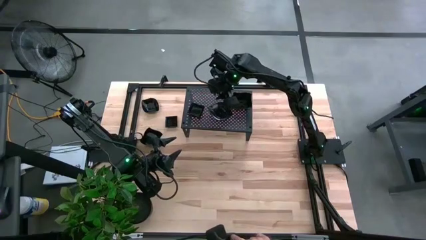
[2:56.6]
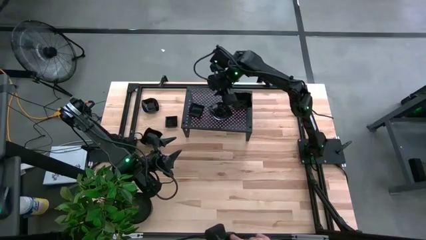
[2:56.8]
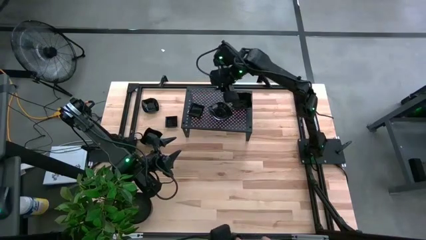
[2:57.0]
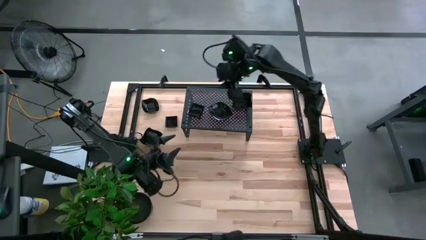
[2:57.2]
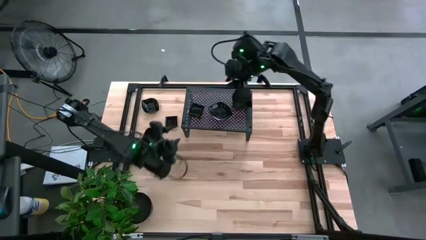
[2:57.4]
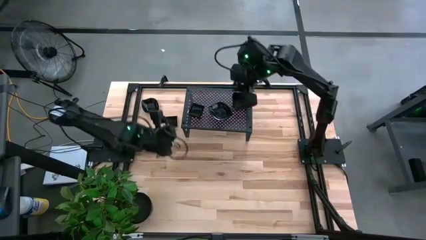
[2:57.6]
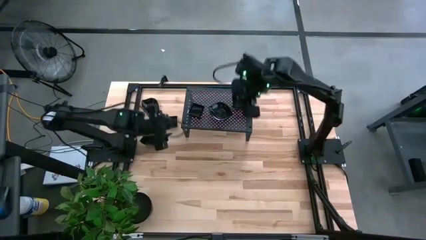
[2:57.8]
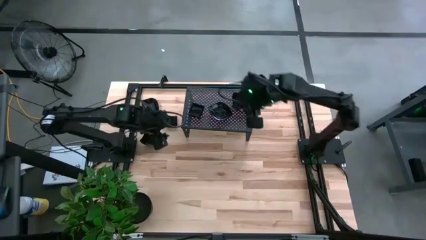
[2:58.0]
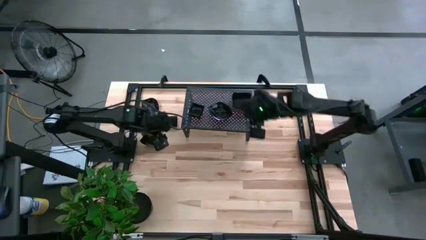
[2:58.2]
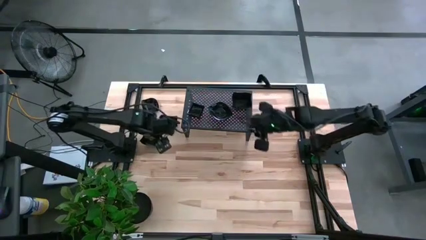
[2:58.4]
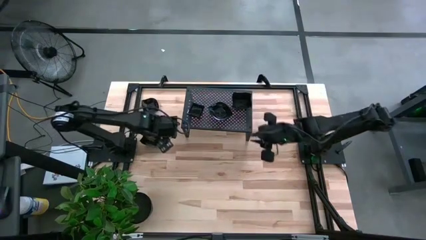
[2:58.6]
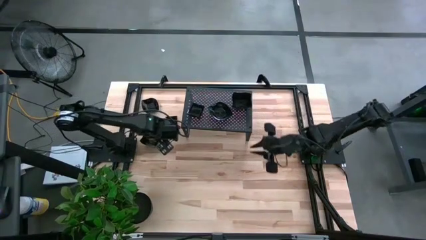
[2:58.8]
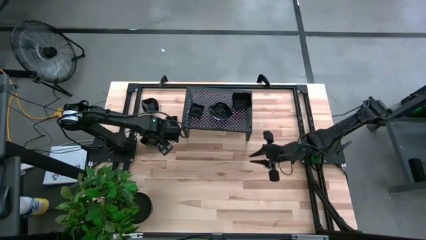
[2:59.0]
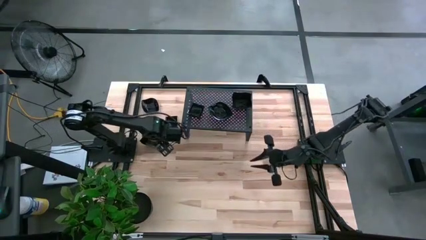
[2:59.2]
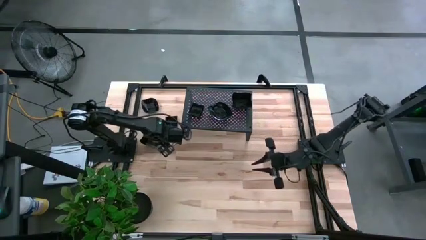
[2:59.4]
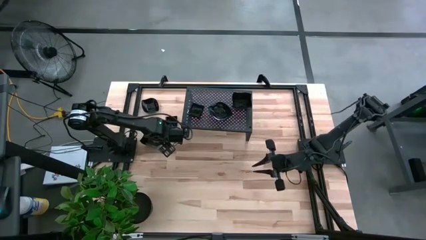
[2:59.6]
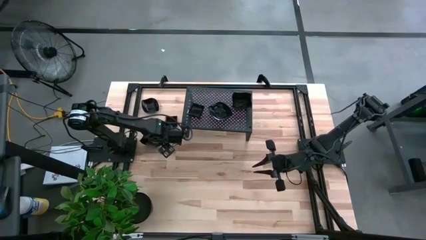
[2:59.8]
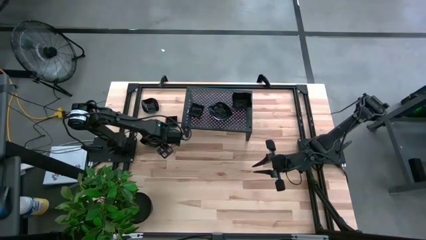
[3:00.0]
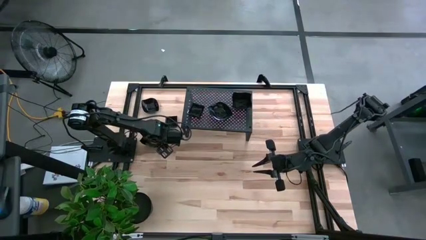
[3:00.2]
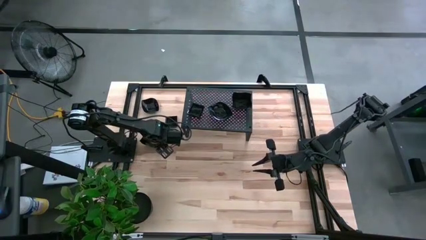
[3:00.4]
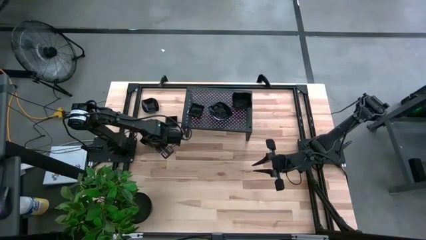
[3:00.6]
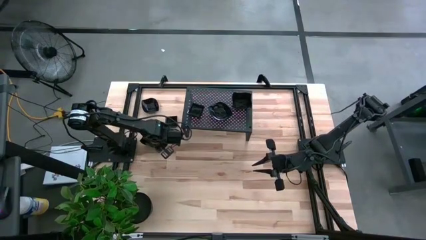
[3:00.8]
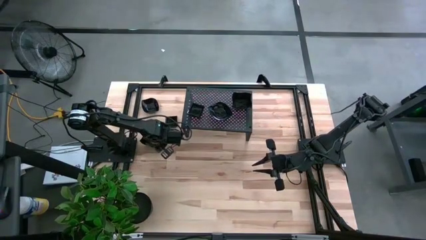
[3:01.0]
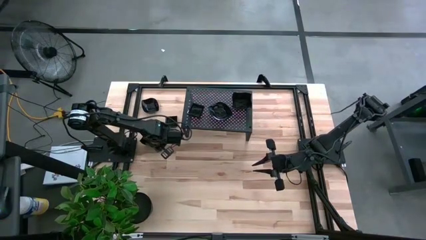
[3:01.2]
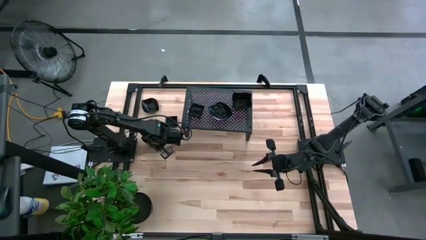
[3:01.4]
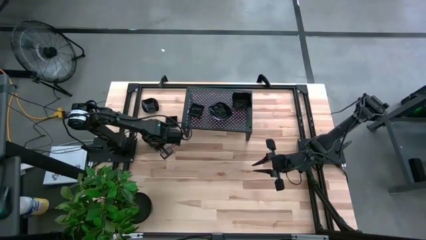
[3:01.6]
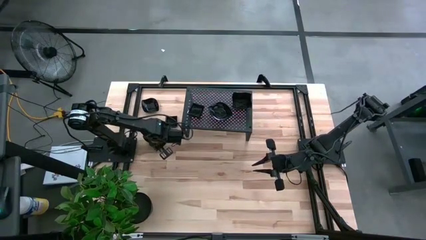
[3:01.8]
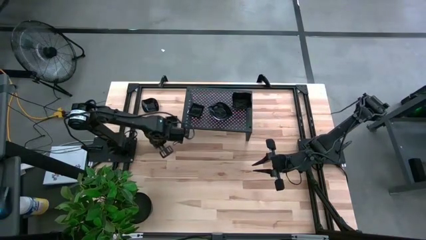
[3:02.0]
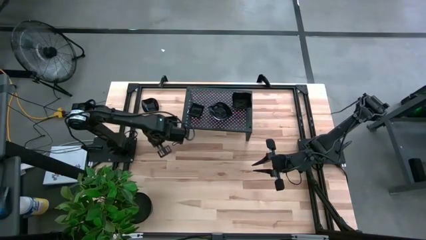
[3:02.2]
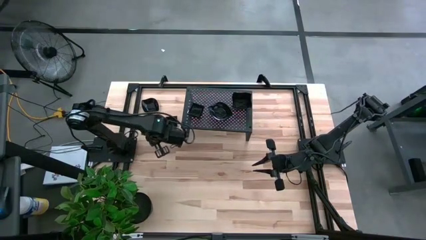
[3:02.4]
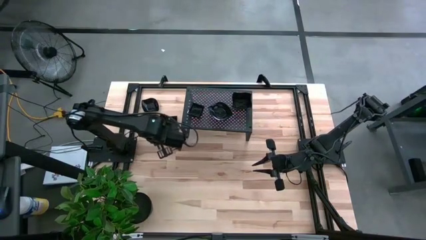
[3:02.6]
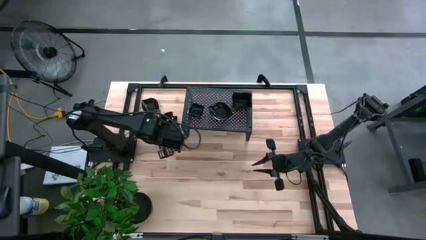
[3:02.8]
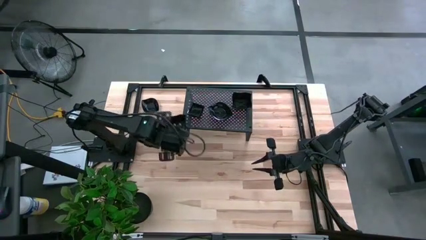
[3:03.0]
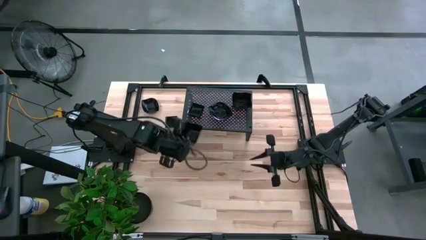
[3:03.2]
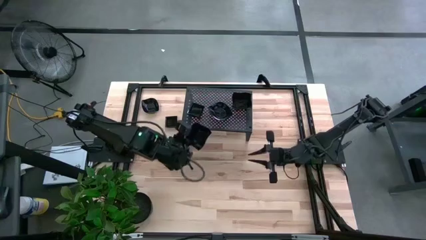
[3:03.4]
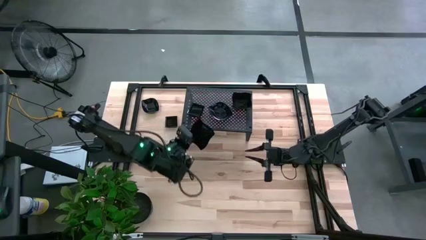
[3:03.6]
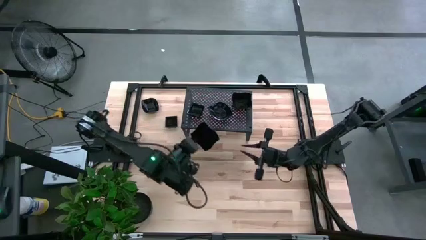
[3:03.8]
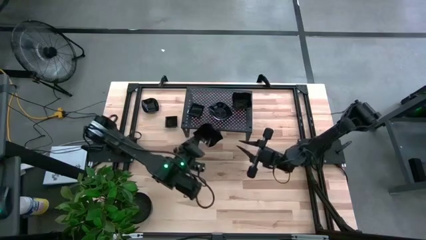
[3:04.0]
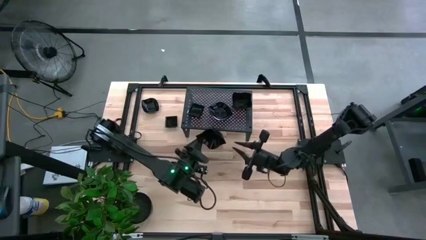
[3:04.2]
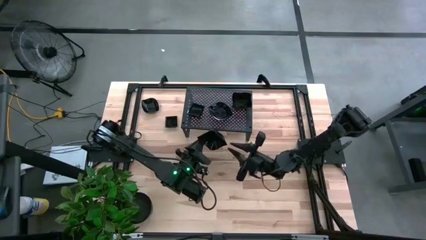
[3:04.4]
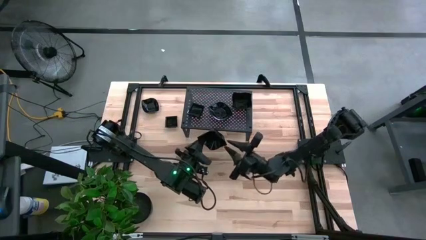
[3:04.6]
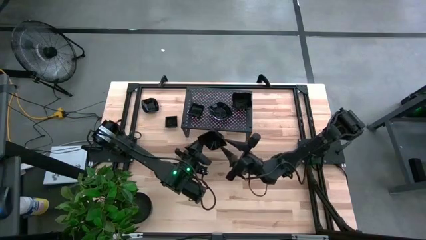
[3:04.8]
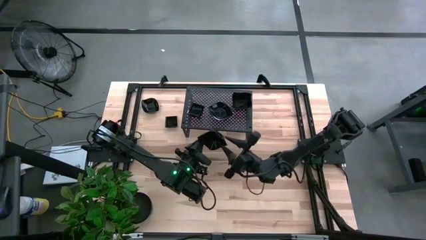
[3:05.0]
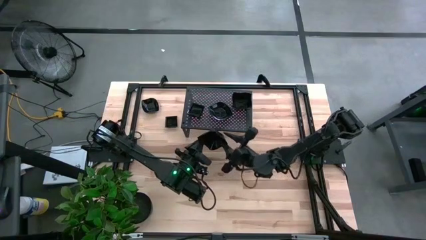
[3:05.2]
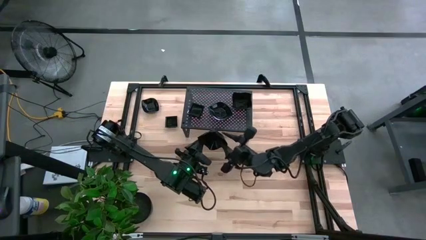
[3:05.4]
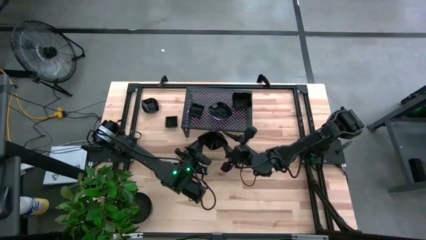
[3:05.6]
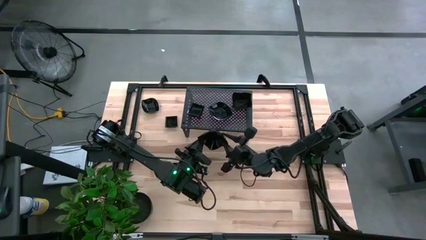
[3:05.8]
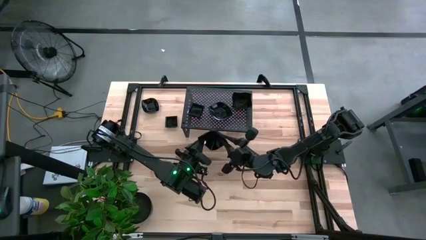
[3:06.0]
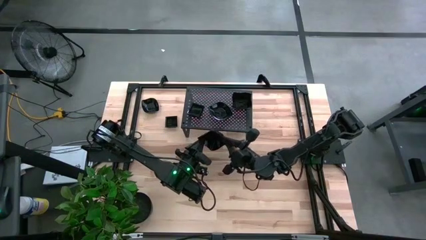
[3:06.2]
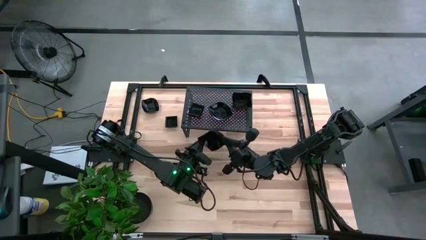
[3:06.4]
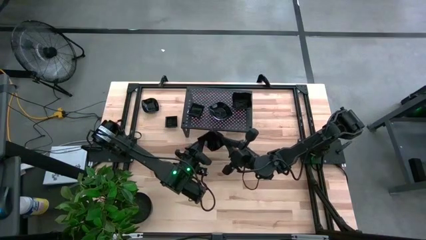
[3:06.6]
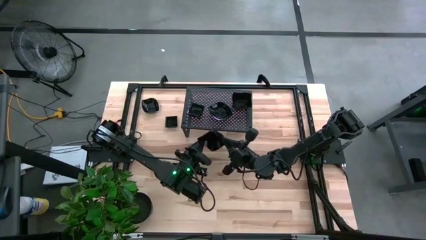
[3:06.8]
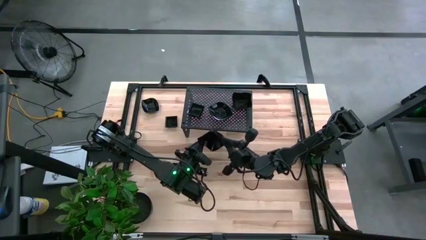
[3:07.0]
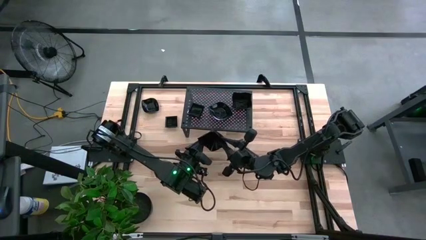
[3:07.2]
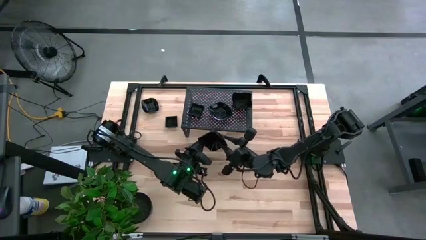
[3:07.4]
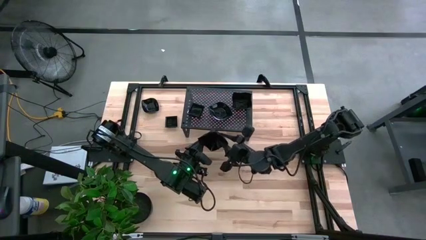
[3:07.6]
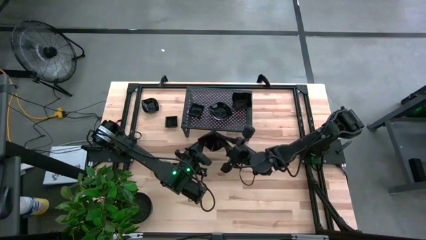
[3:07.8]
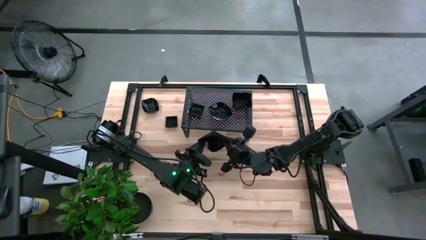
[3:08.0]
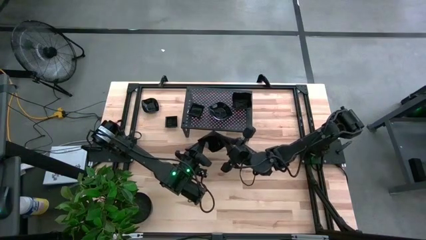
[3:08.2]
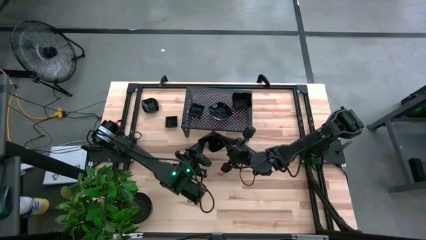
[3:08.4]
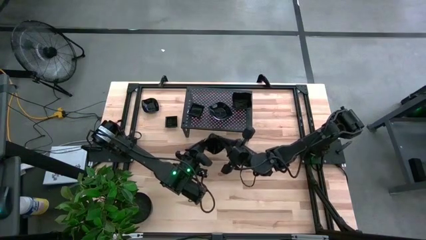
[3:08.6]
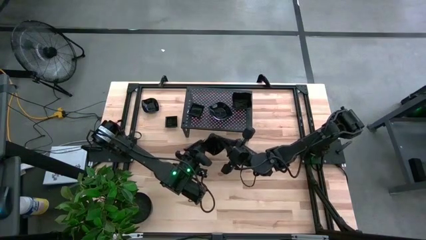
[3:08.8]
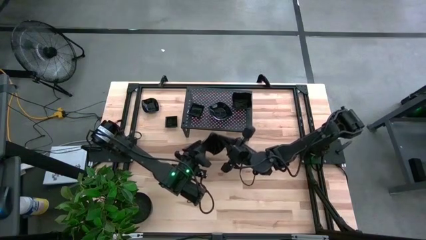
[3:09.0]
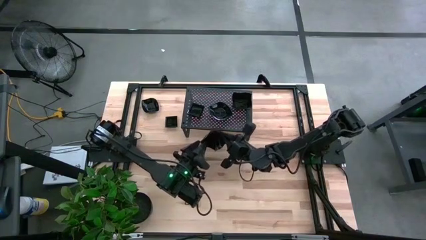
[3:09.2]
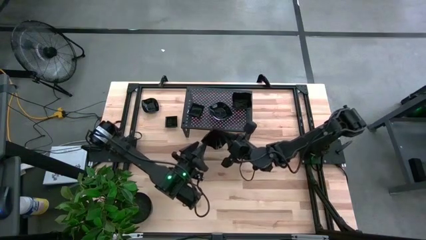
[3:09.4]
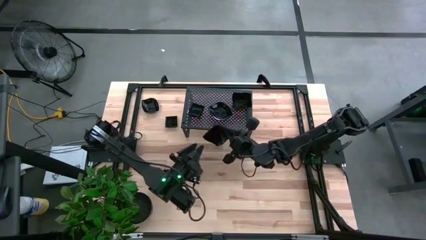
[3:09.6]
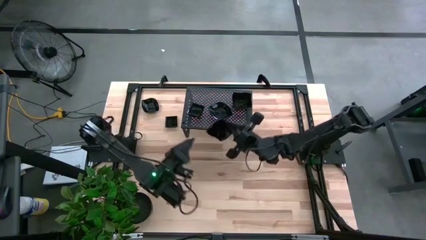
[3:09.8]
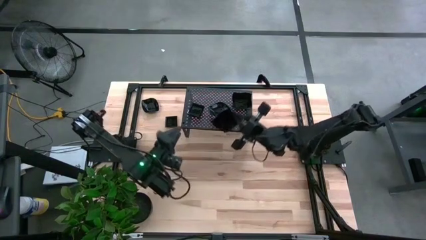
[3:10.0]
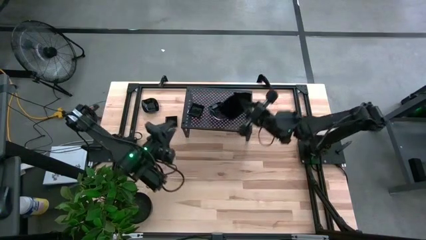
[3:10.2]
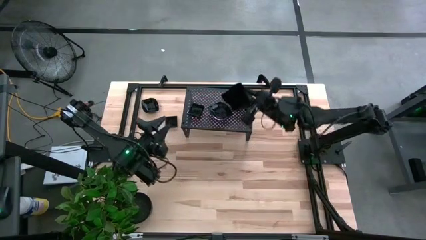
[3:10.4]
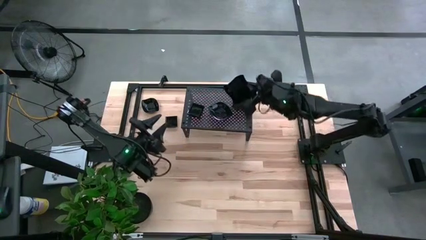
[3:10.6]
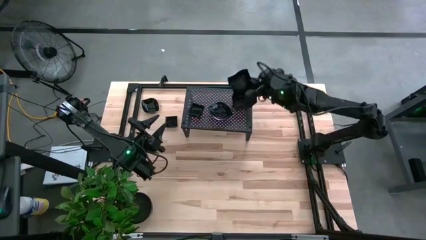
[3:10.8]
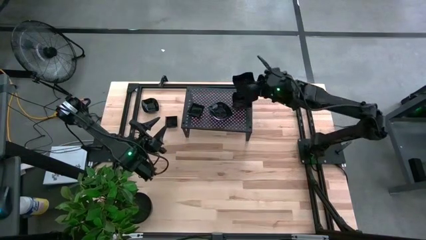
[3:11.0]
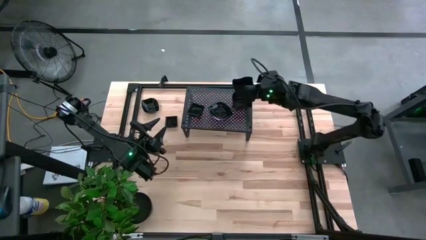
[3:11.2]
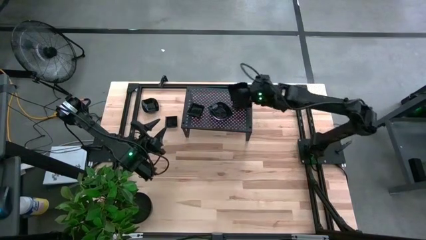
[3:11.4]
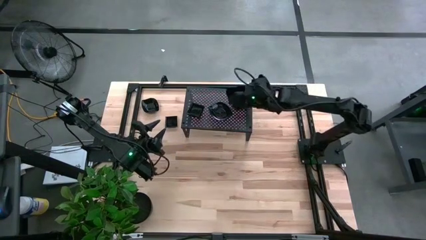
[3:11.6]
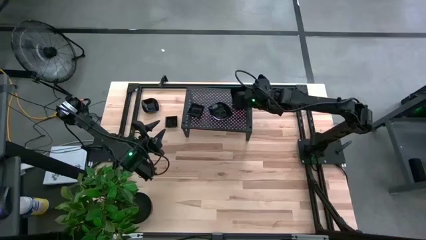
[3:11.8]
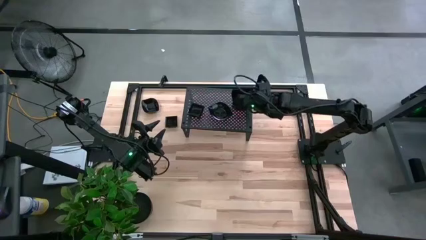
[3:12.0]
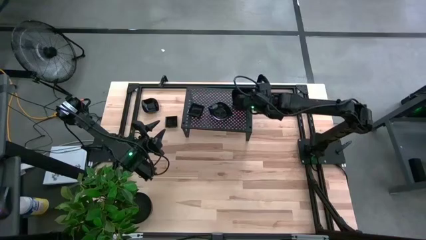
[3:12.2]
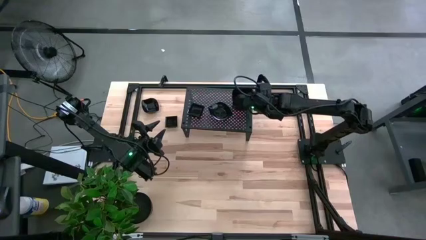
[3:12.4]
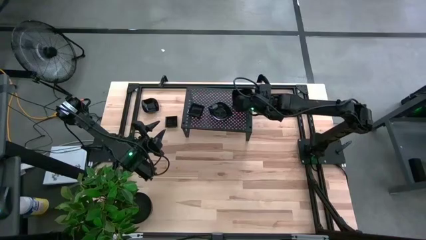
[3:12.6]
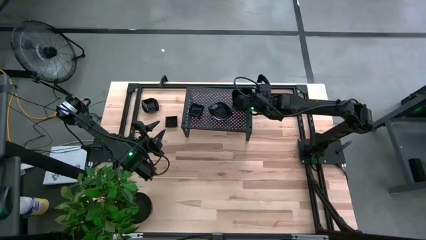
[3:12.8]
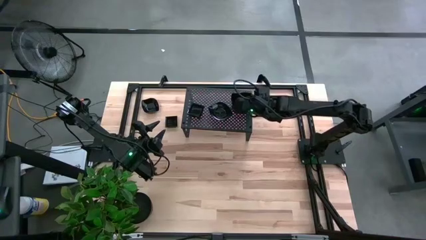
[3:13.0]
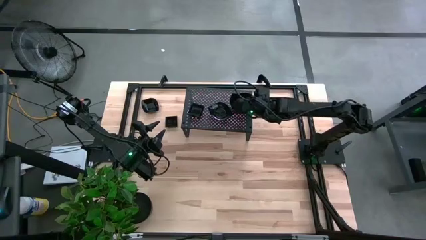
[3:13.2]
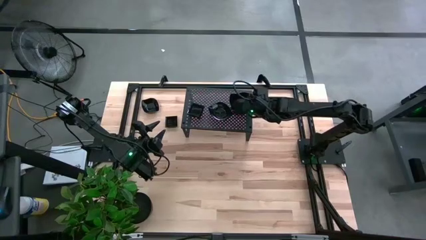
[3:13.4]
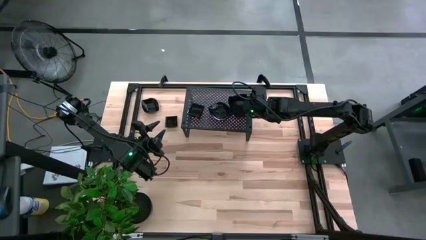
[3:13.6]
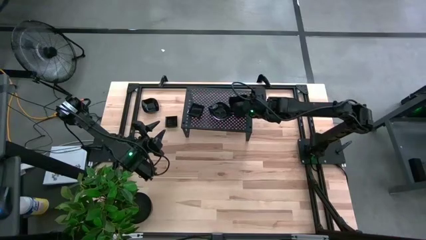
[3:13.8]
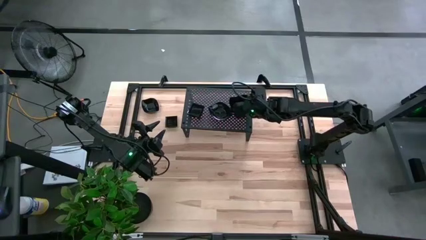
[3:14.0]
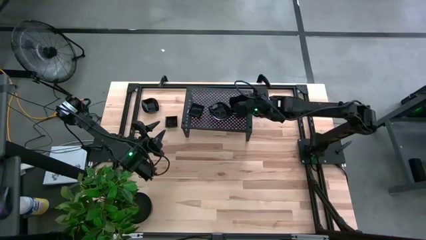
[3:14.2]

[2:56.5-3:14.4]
Task: Pick & Place Mini shaped plates
Stack the distorted square plate on the distorted square plates on the shelf
